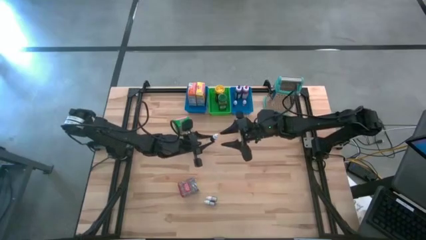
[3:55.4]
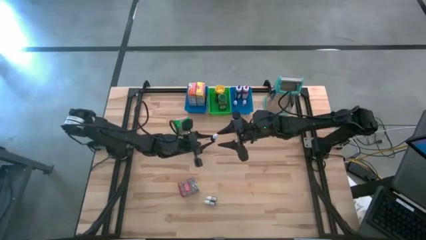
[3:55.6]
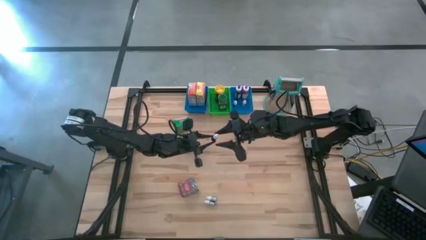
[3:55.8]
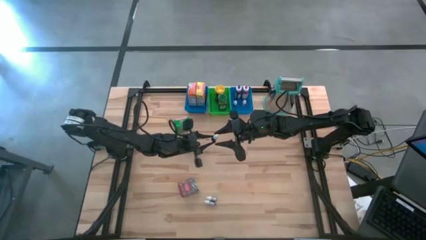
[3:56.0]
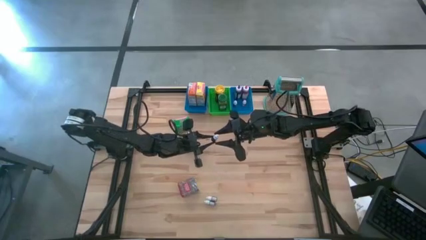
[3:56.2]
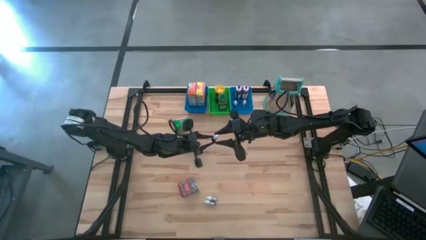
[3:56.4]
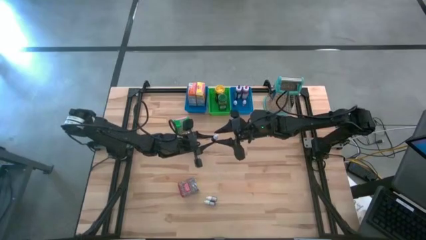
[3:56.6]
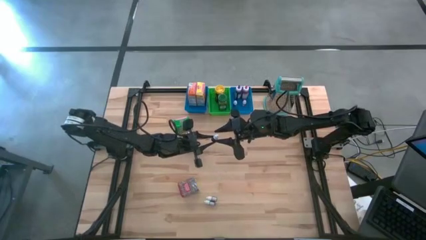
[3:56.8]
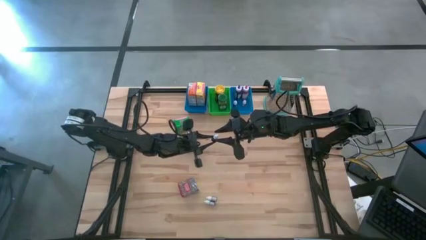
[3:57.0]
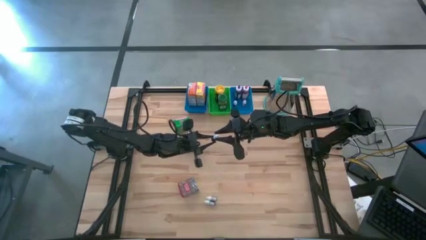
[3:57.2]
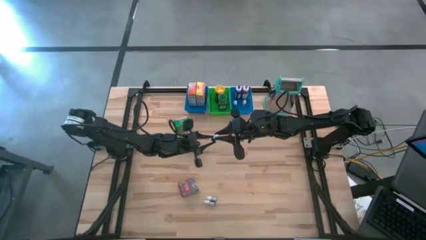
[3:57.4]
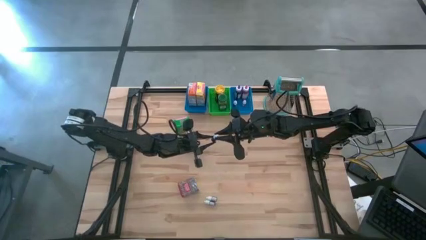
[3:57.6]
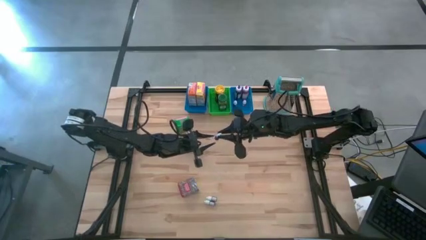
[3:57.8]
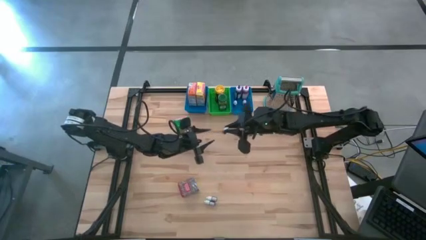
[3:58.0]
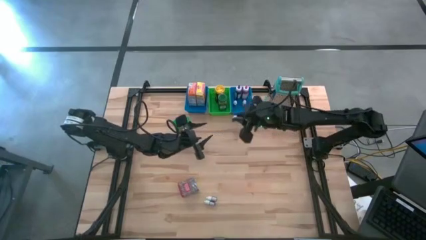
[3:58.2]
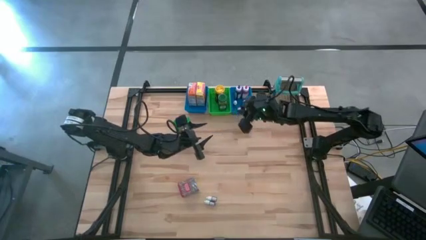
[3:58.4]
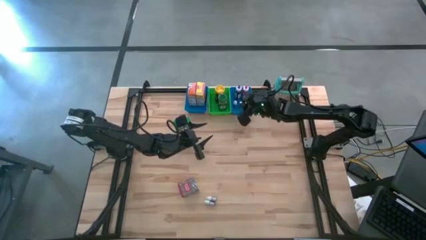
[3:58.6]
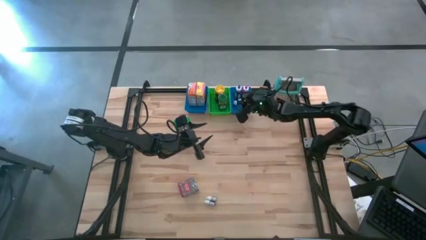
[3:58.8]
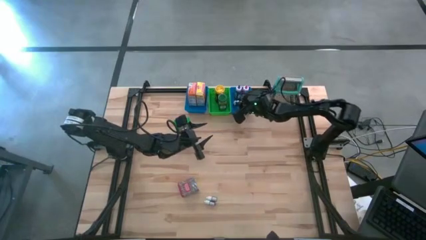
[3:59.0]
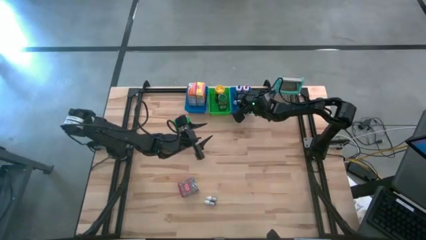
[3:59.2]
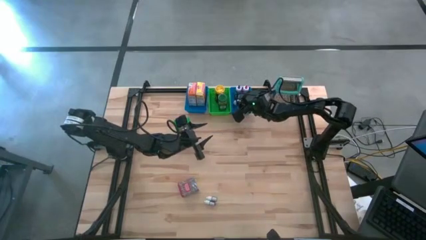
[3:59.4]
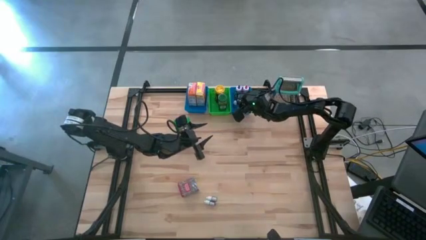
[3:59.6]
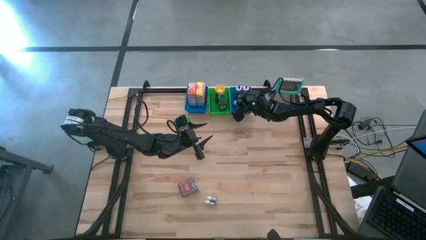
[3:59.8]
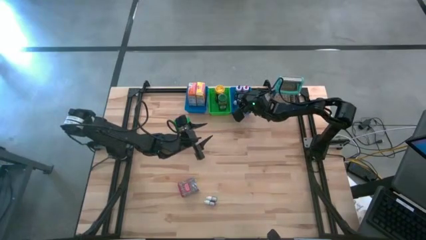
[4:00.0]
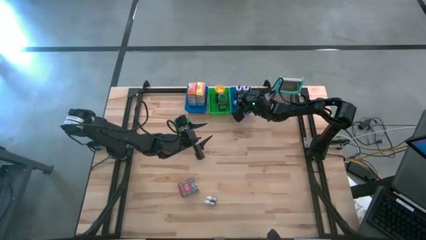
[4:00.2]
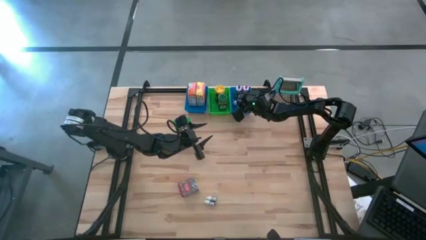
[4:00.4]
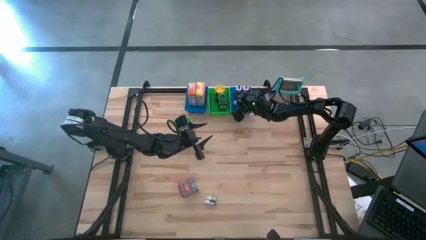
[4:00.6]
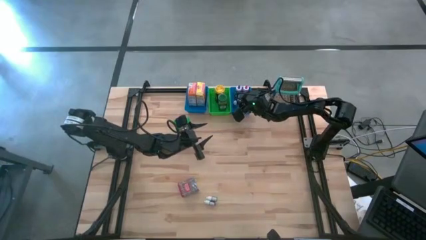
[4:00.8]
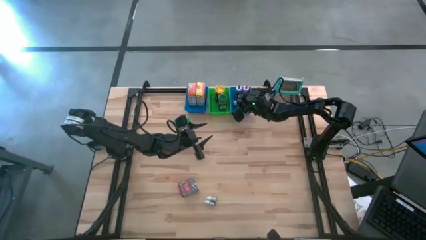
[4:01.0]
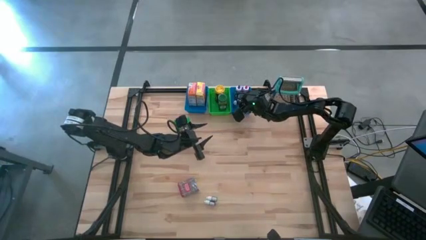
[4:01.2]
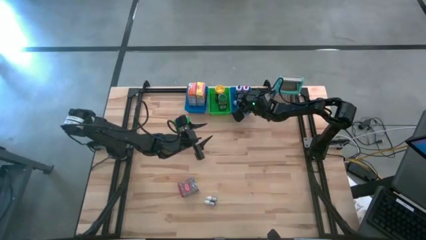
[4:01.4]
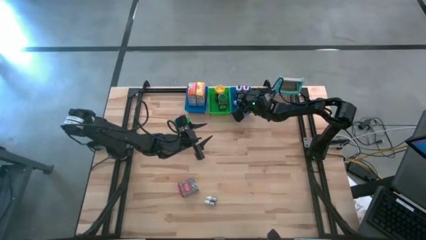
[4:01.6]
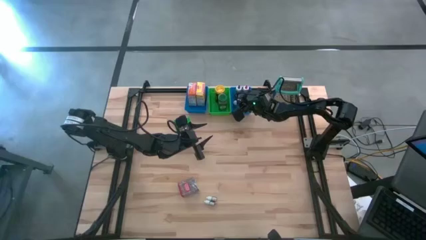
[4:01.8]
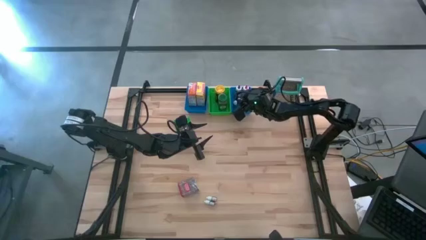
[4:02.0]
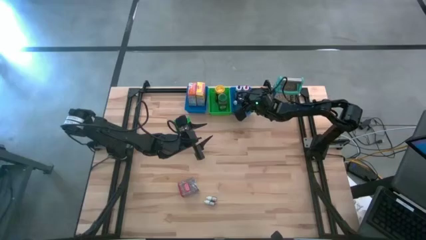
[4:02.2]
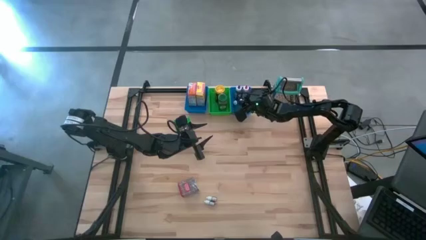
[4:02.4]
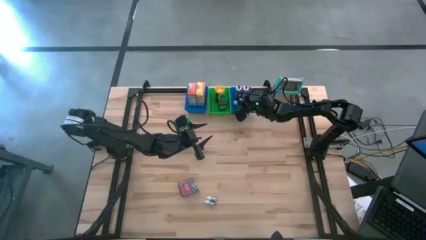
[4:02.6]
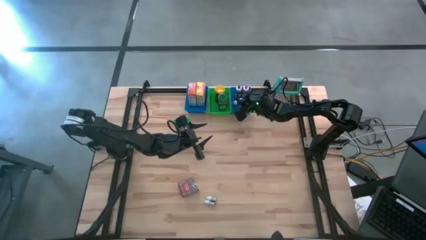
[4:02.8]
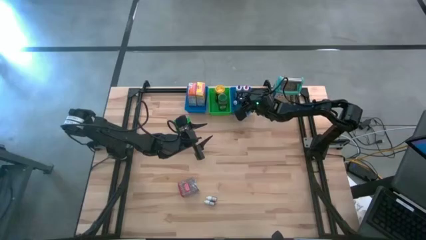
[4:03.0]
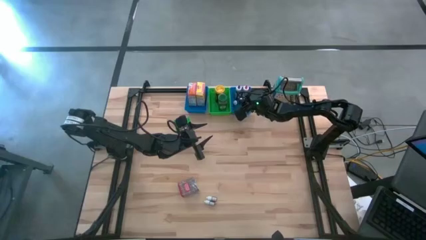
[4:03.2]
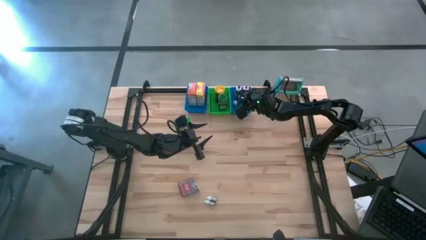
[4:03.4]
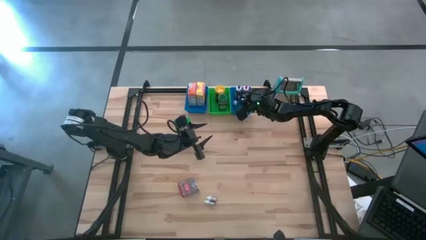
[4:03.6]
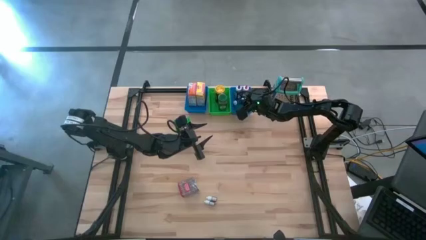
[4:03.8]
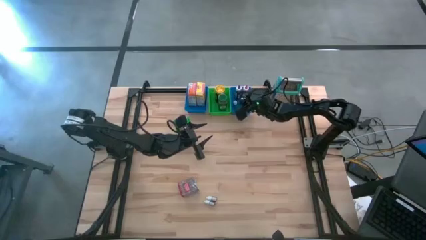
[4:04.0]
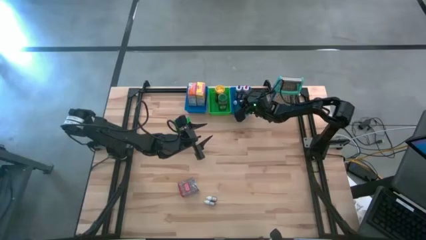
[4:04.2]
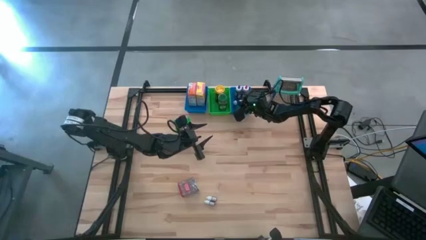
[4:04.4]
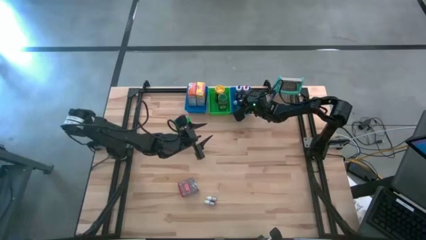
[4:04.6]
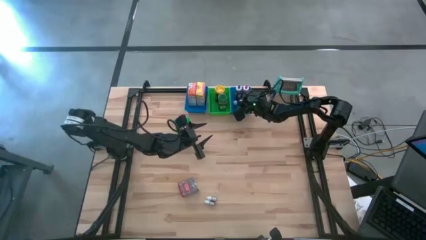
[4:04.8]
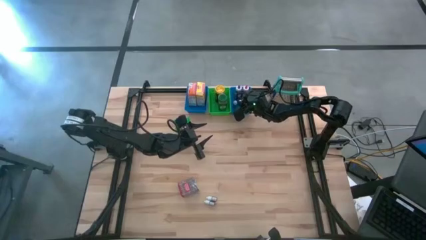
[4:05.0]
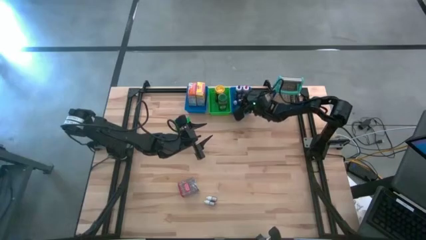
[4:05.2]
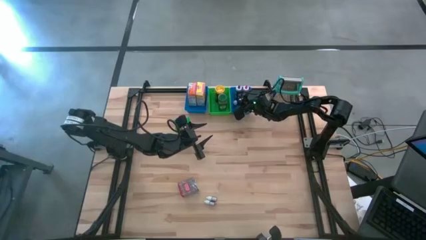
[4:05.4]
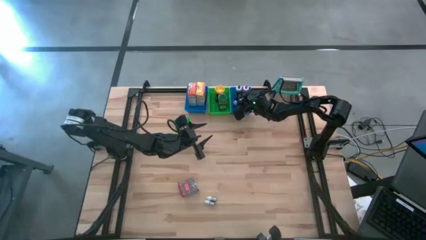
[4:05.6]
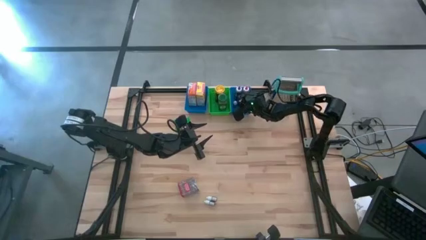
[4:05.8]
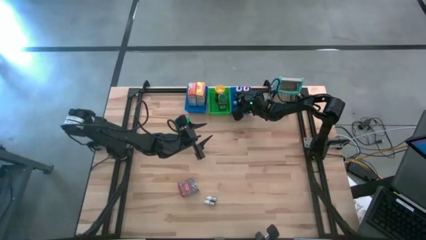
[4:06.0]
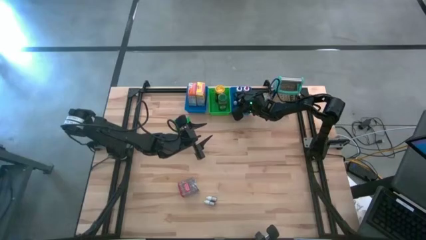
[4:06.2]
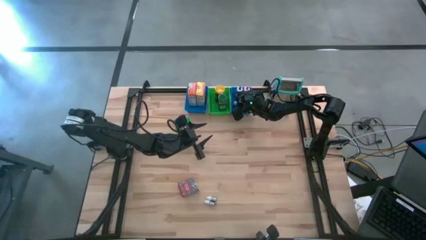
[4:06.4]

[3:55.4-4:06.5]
Task: Pick & Place Kitchen Items
Put the top small purple food bottle coloring into the right blue bin

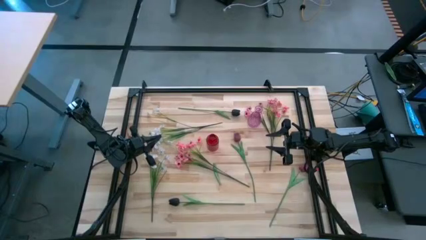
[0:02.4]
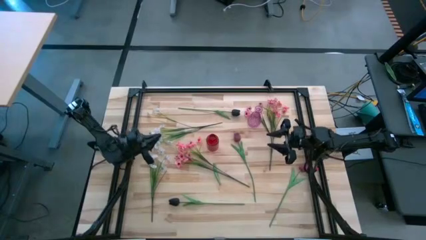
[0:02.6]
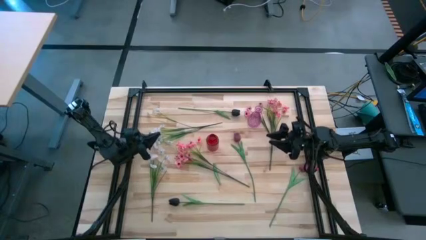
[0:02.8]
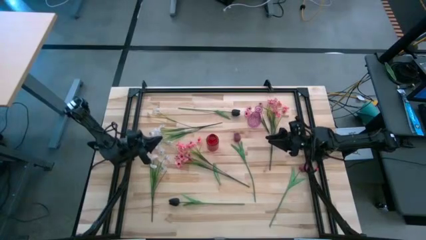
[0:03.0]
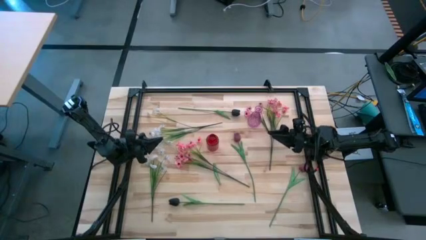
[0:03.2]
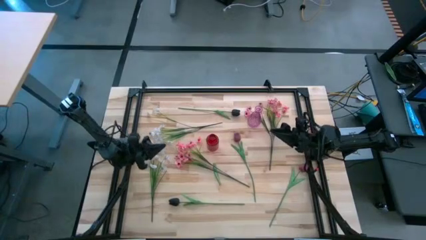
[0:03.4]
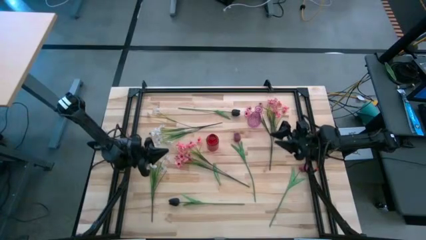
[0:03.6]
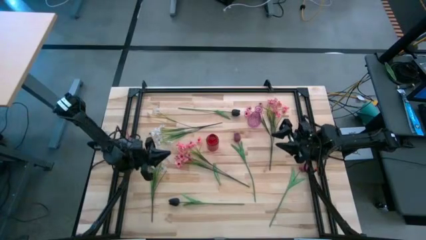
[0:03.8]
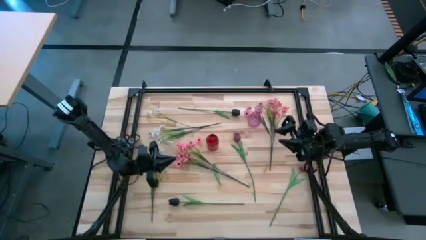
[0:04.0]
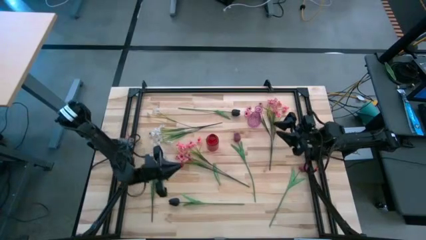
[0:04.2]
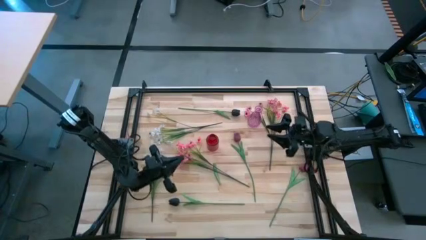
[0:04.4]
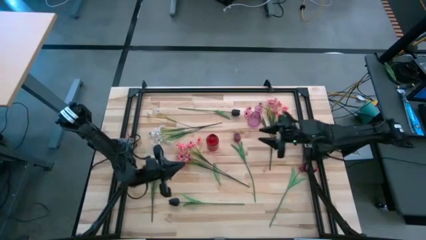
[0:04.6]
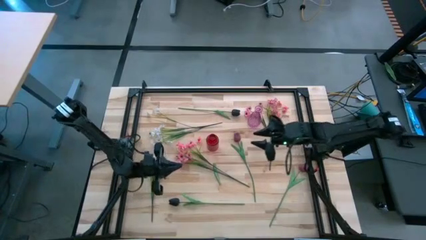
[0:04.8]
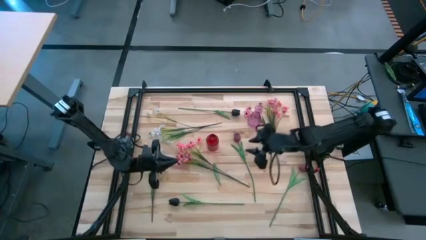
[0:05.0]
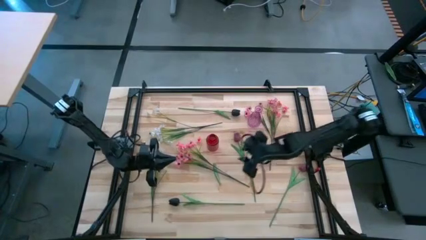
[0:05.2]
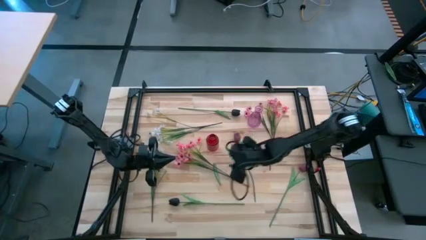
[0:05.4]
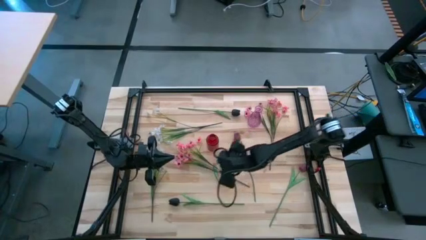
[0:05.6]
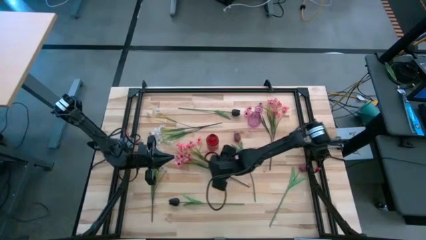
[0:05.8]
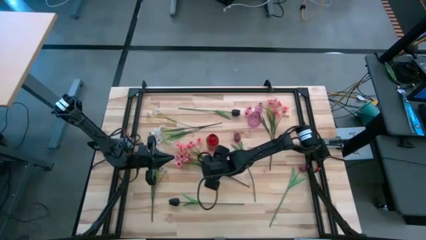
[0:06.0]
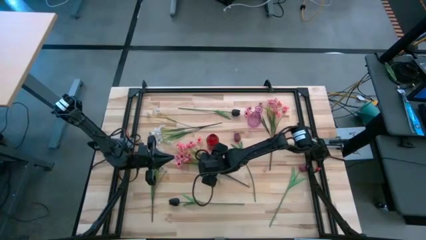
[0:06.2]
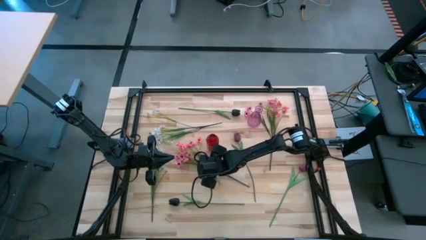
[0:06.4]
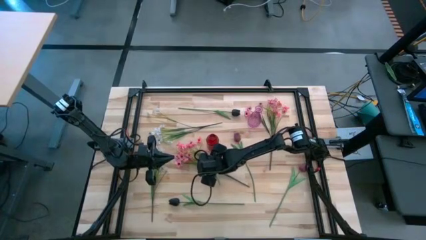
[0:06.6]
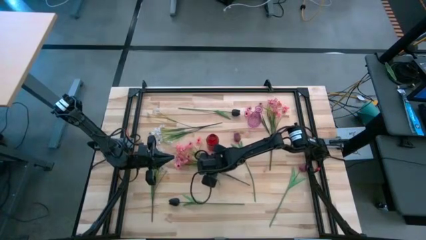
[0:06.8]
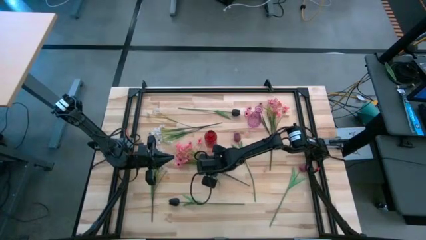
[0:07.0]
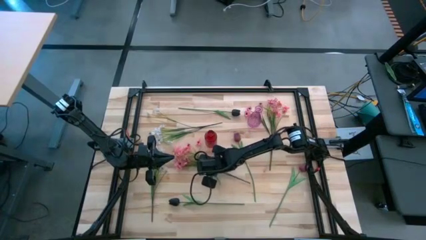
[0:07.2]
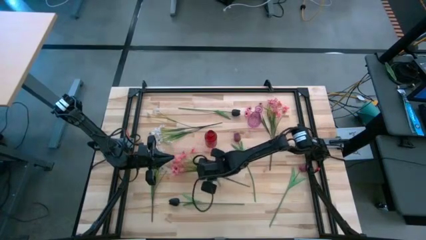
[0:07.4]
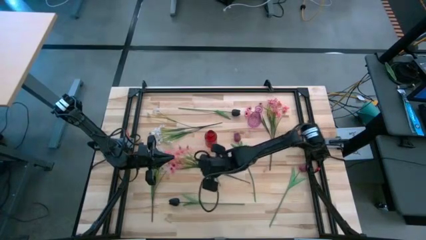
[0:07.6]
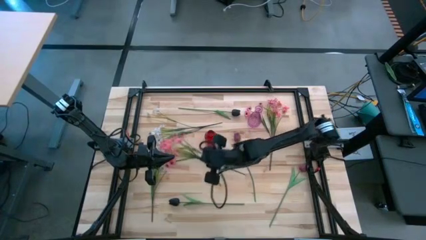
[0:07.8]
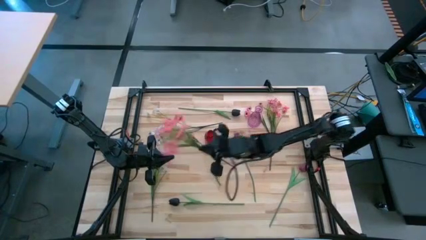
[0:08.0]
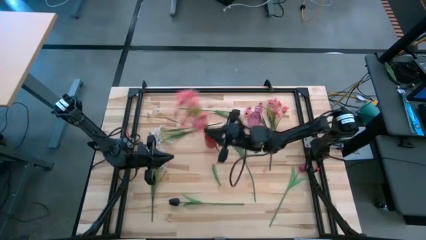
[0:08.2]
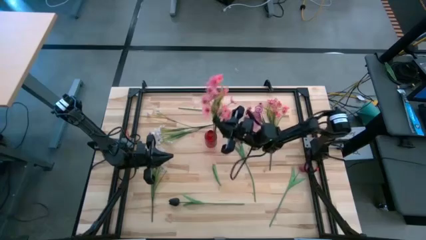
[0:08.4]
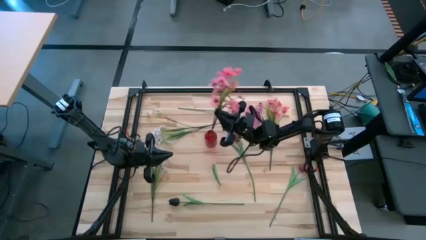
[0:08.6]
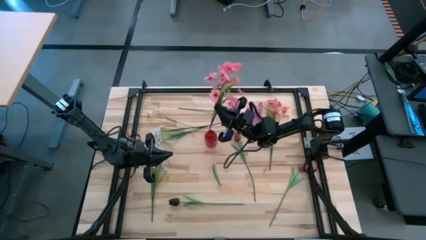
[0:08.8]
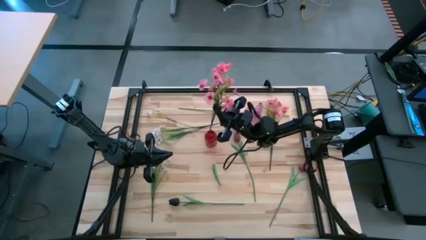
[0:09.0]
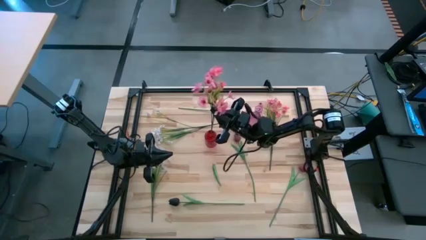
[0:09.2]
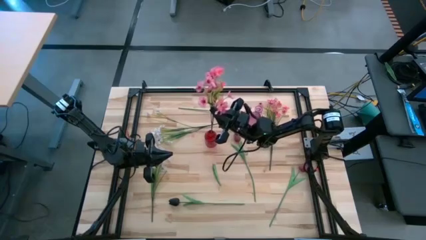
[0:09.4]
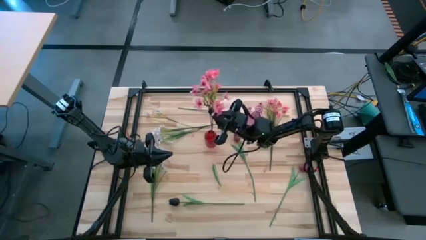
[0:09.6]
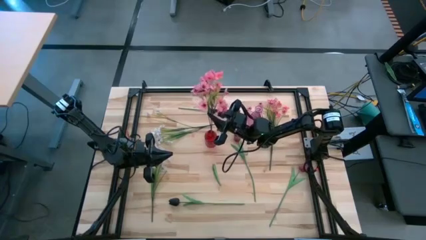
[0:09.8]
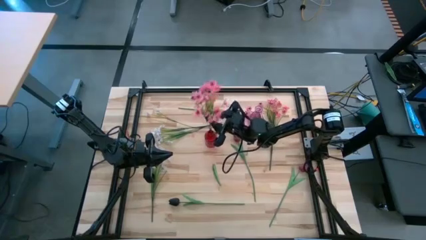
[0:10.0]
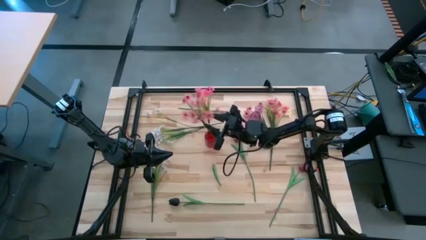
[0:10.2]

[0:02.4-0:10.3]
Task: Sort flowers into vase by color
Put the left pink flowers into the red vase
